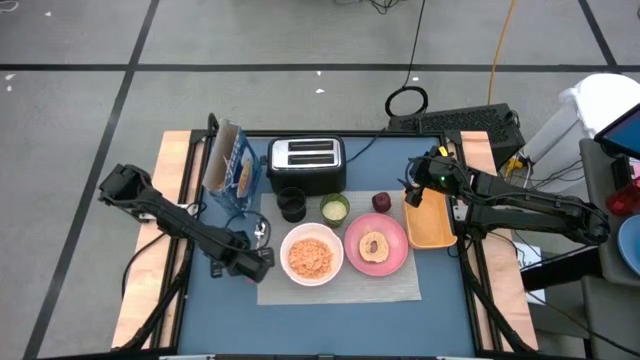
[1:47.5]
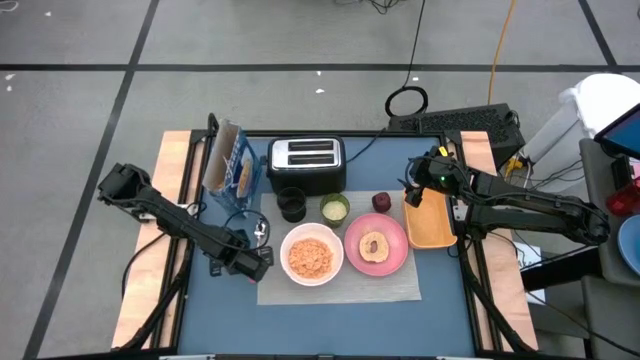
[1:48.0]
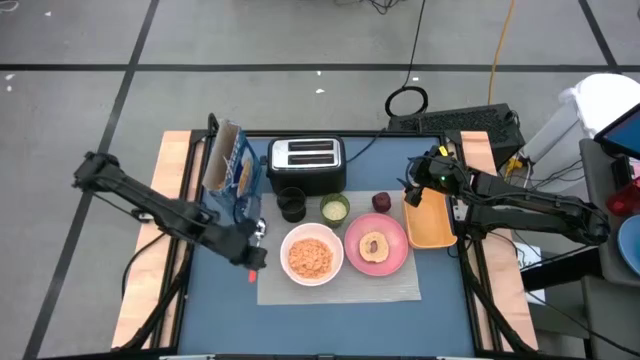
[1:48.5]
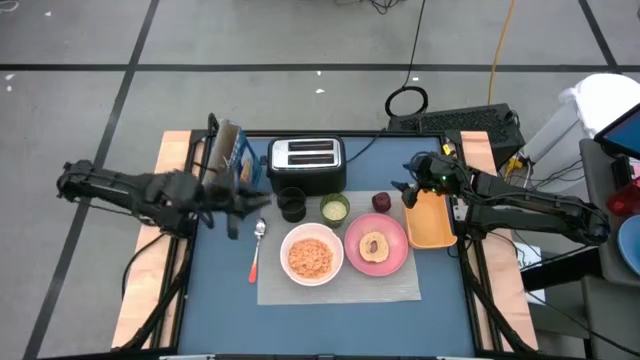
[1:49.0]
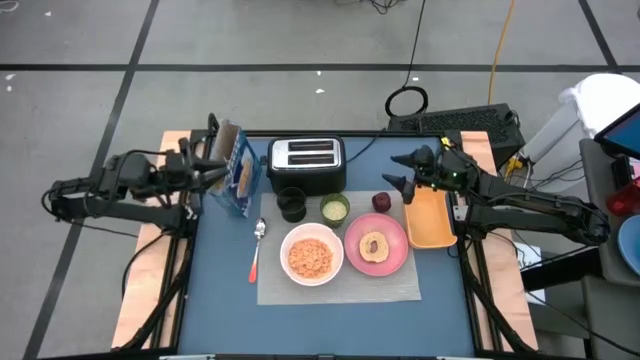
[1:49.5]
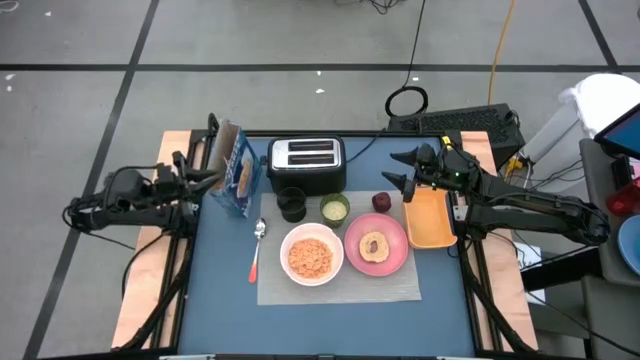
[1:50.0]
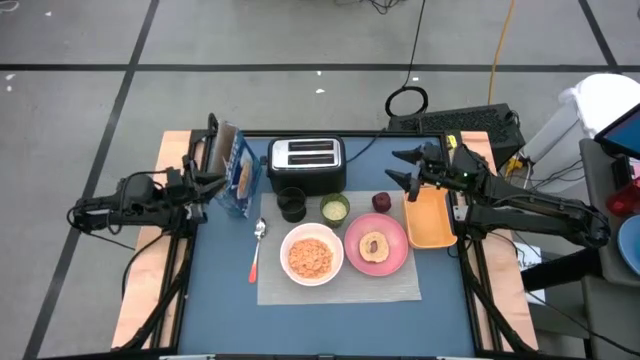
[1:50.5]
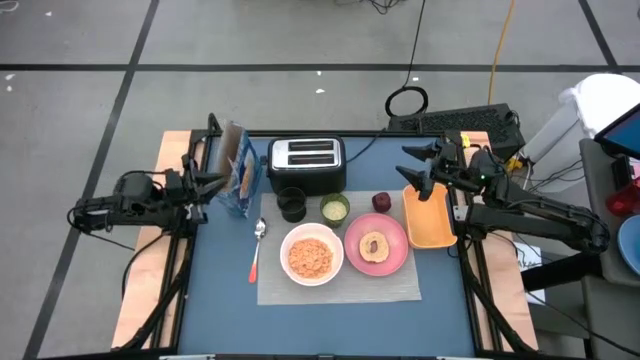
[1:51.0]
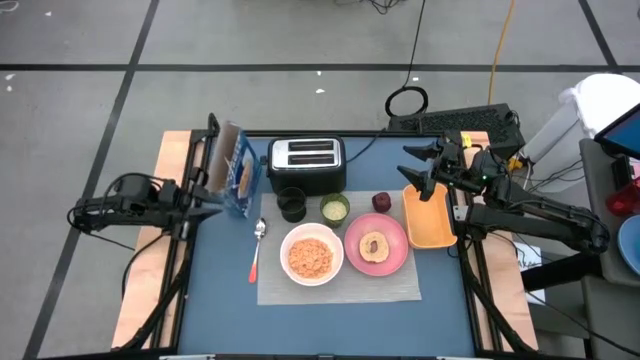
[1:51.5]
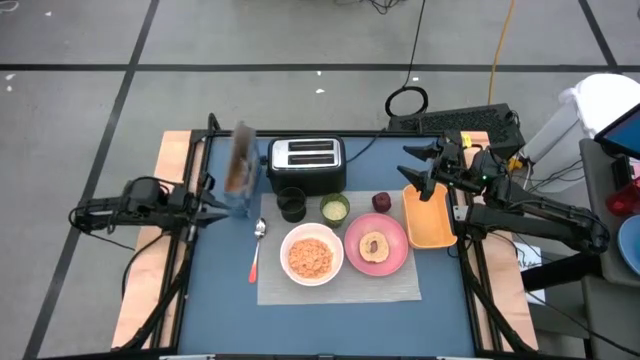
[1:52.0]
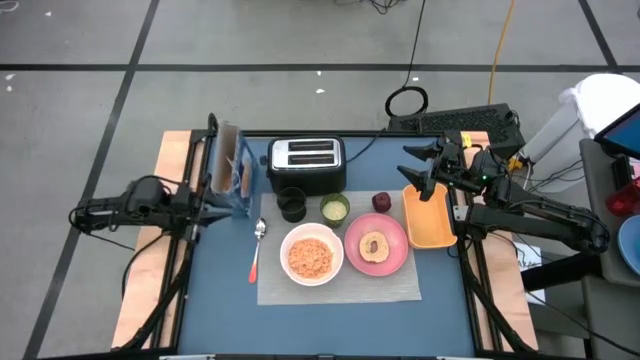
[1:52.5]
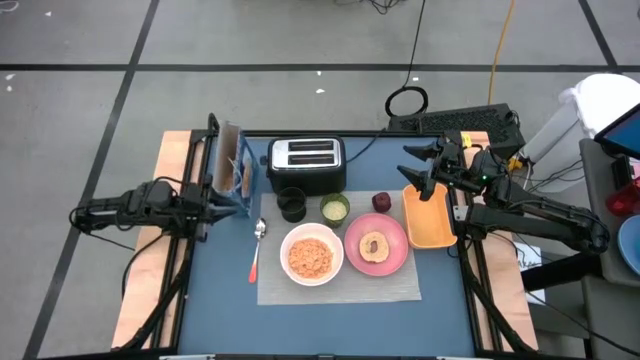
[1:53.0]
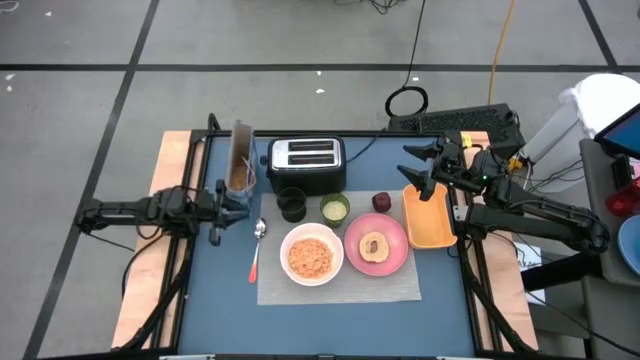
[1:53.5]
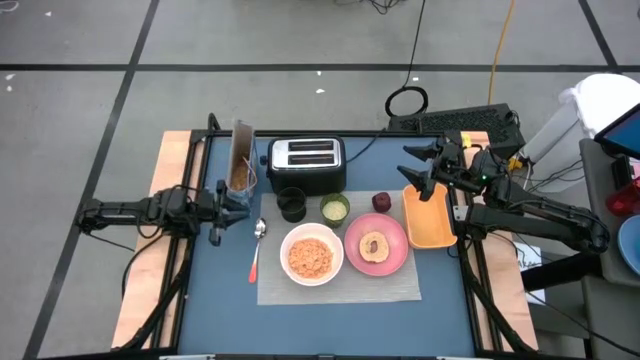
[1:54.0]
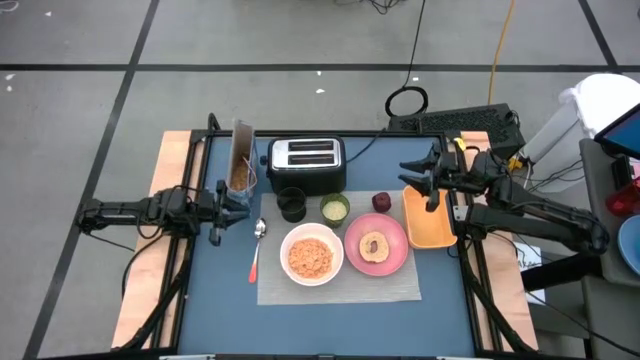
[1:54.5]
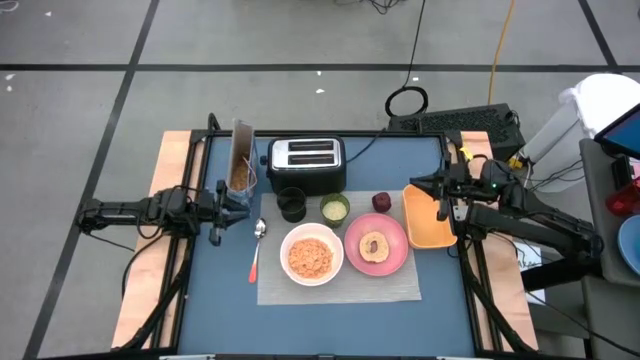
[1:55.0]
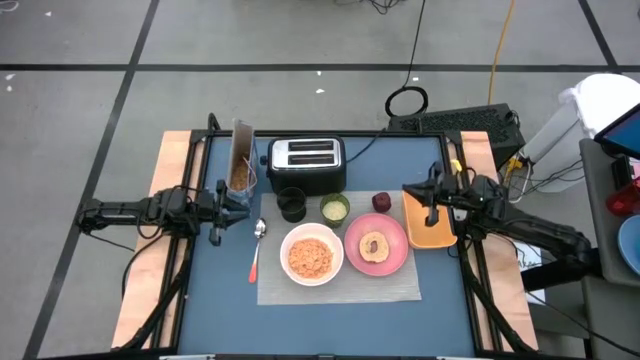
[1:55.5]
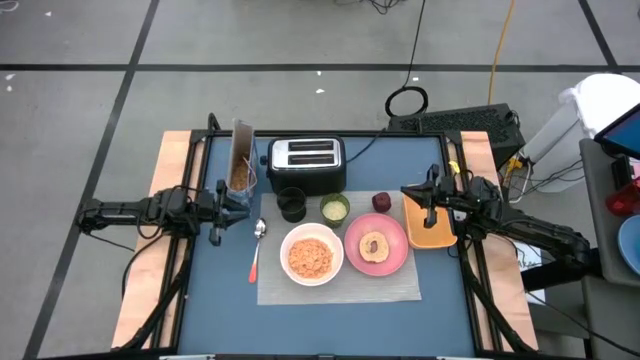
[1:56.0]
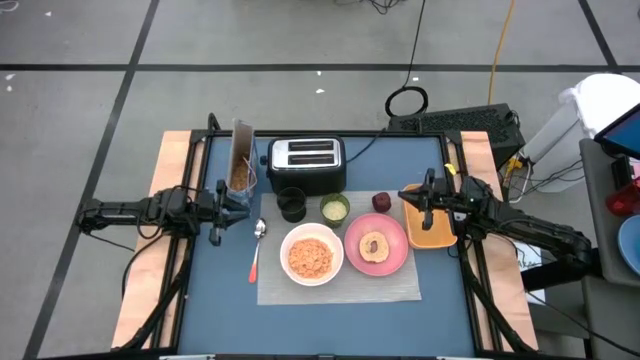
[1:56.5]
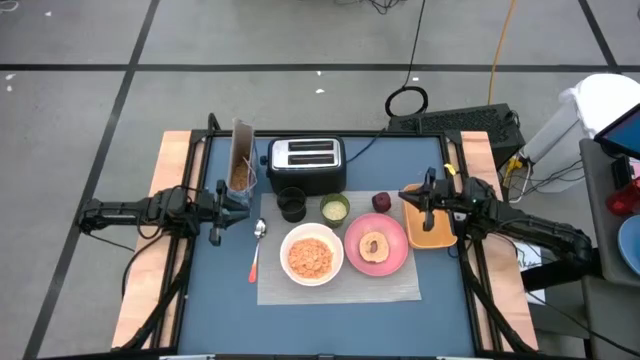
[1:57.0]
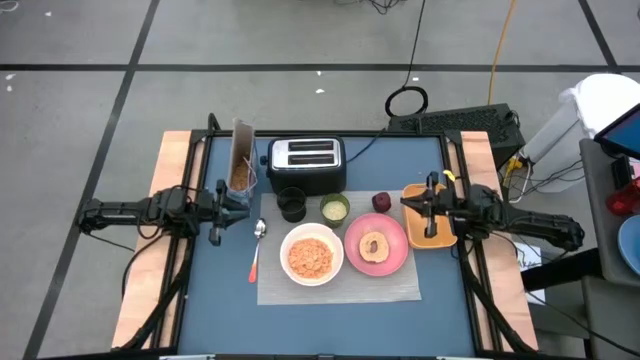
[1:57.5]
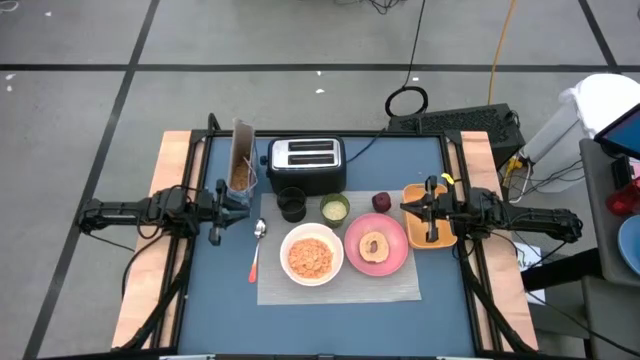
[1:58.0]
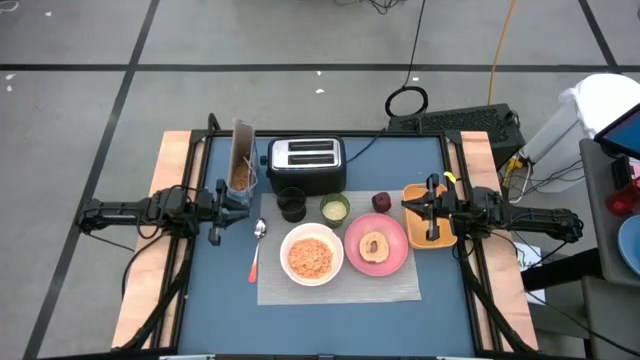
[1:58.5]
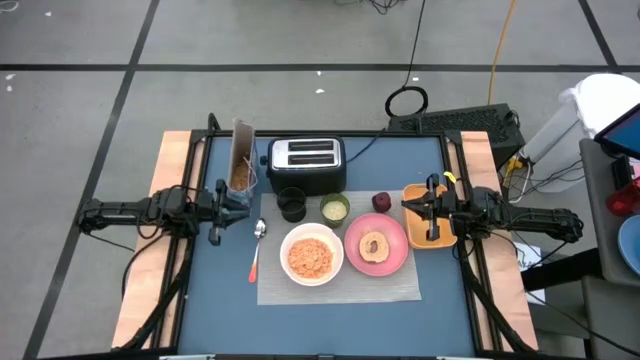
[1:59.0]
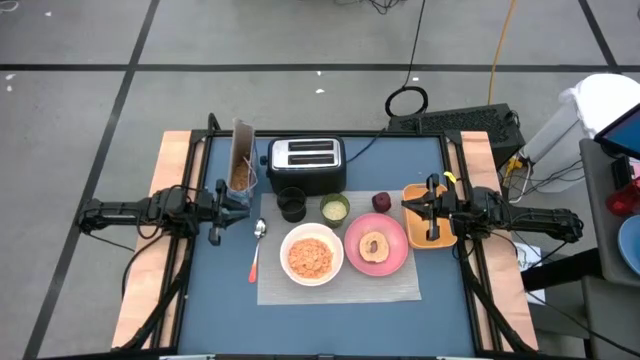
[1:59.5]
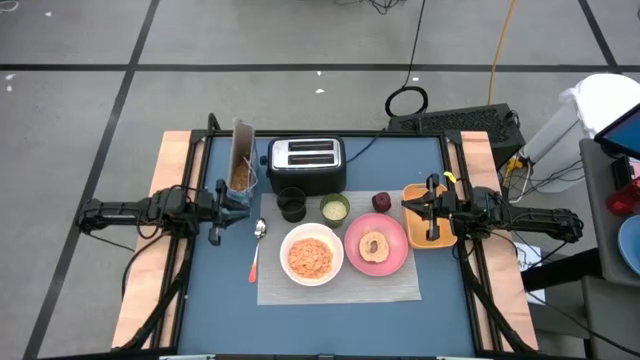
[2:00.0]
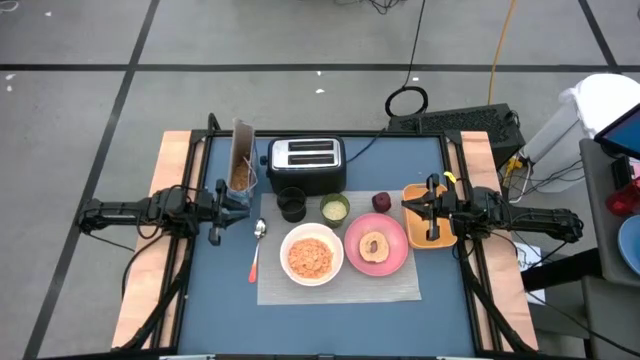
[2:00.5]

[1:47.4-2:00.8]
Task: Arrange a breakfast setting
Return to Home Position

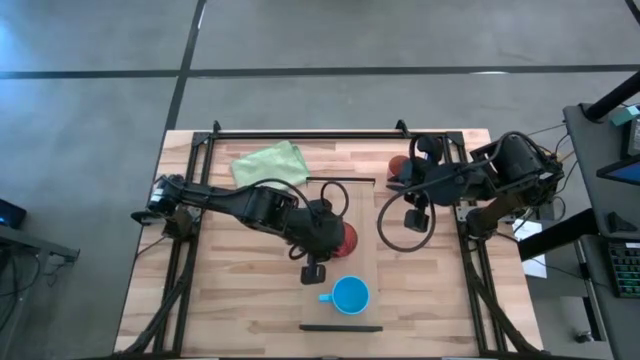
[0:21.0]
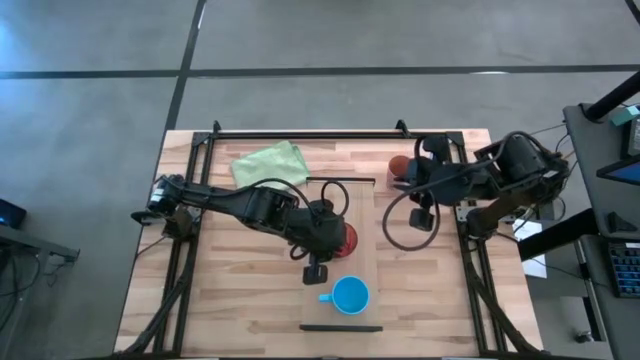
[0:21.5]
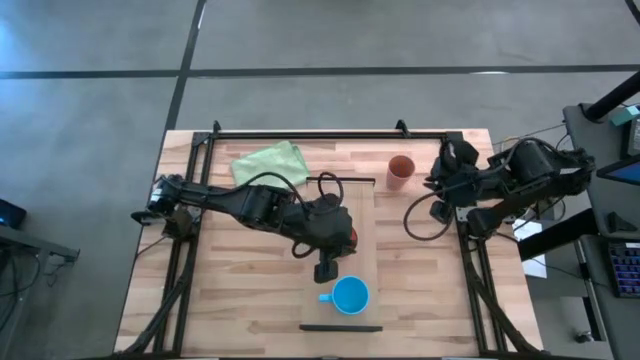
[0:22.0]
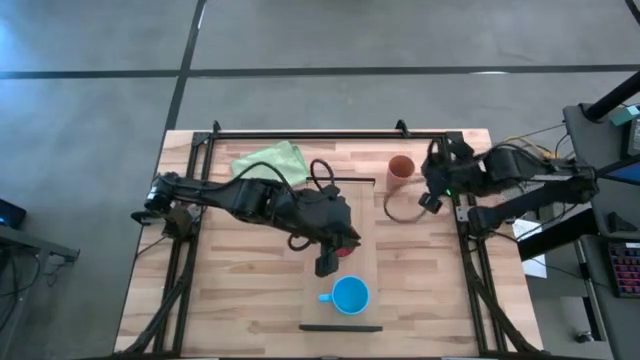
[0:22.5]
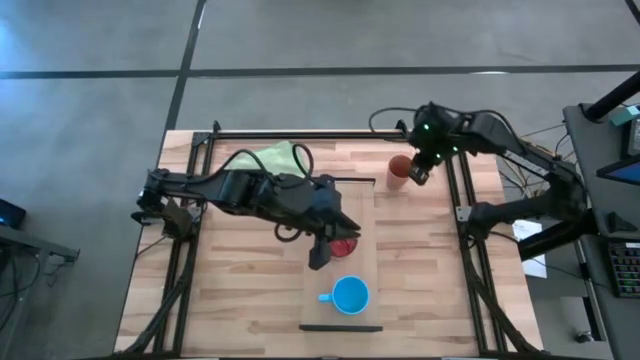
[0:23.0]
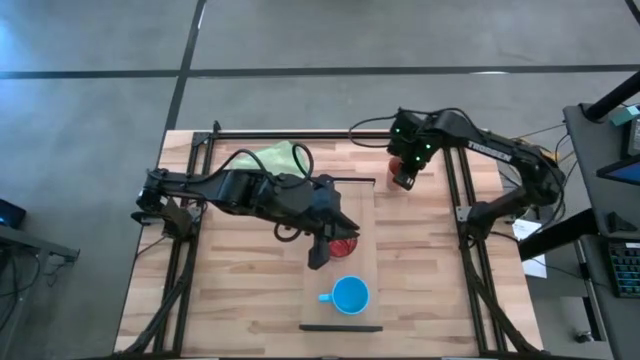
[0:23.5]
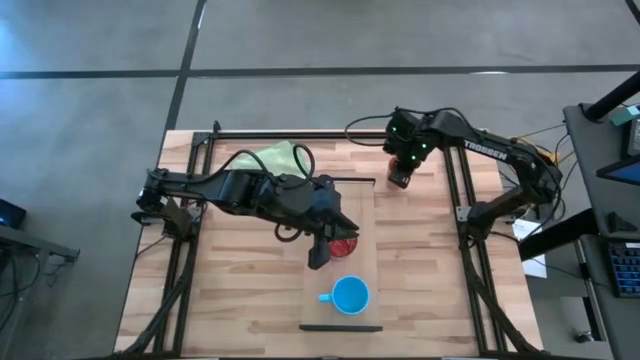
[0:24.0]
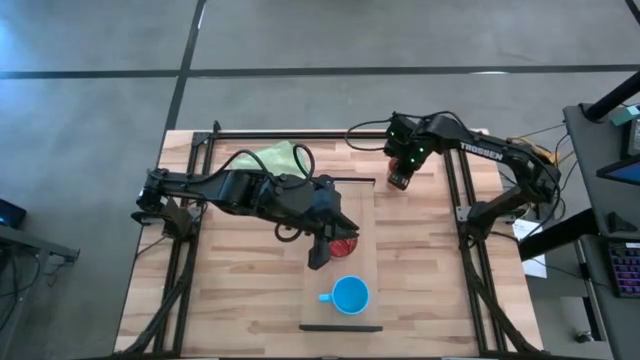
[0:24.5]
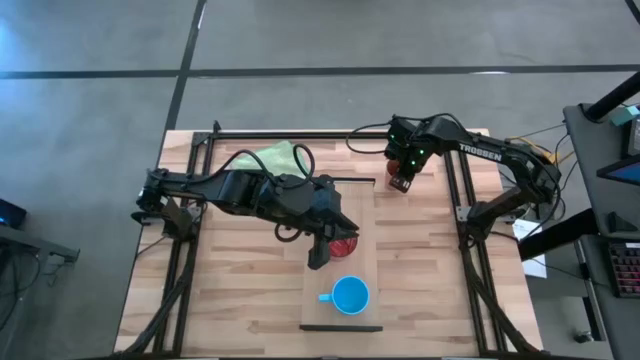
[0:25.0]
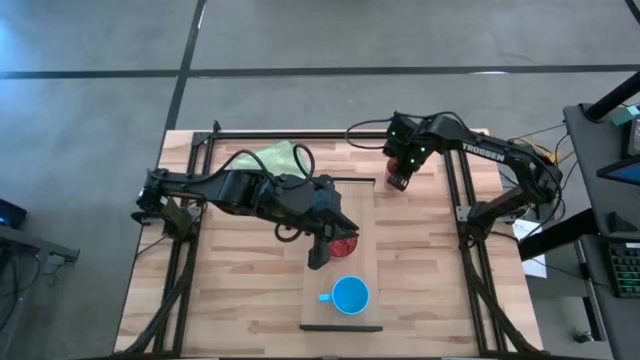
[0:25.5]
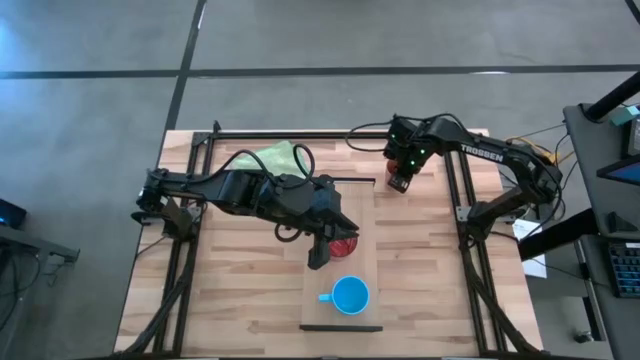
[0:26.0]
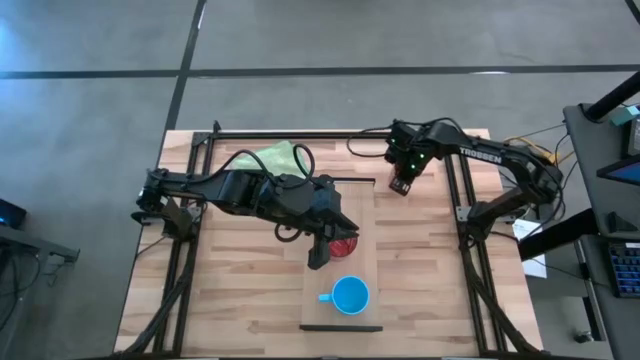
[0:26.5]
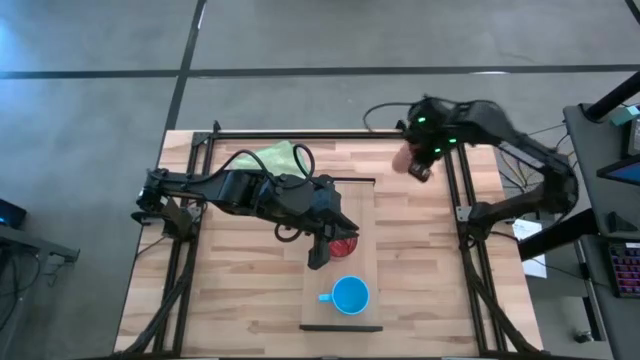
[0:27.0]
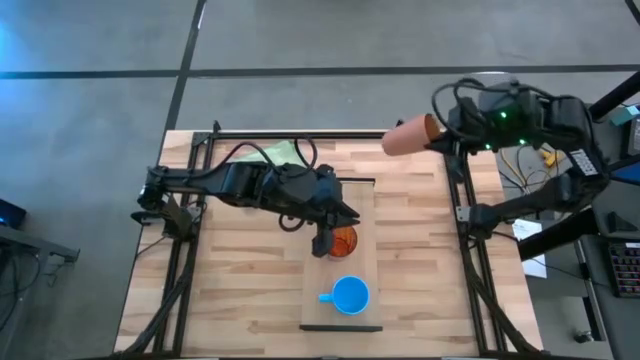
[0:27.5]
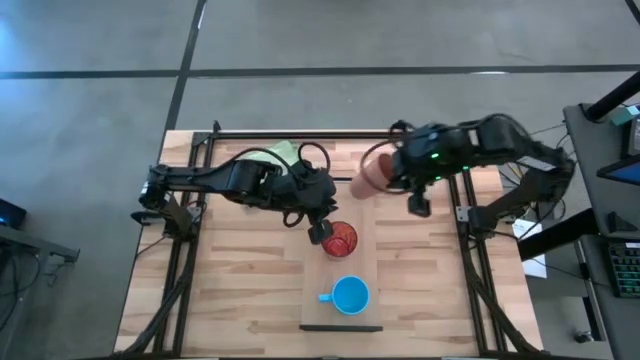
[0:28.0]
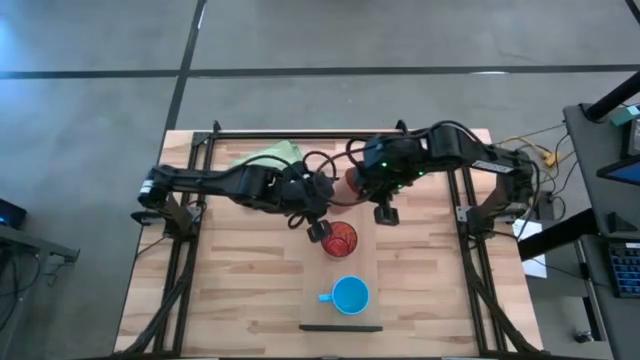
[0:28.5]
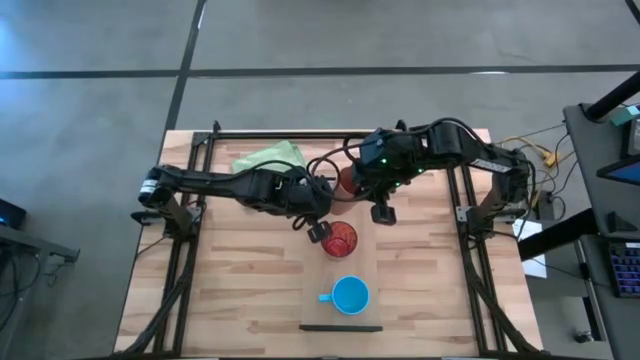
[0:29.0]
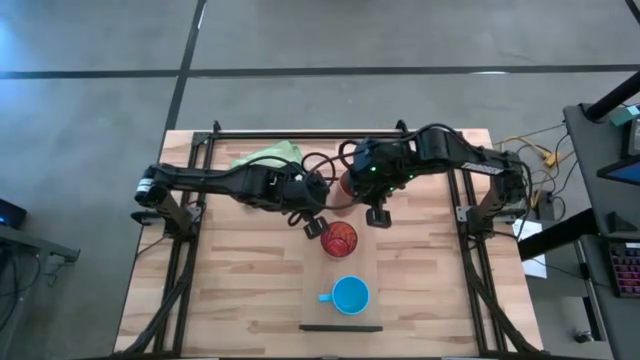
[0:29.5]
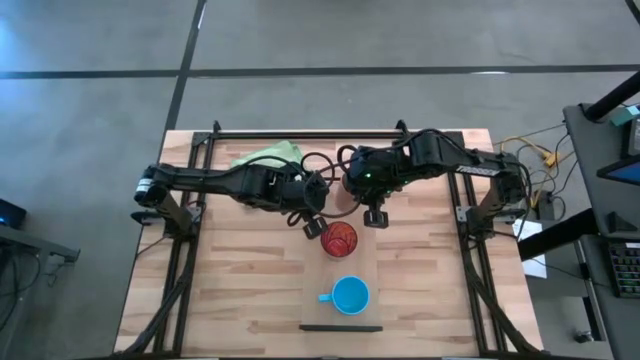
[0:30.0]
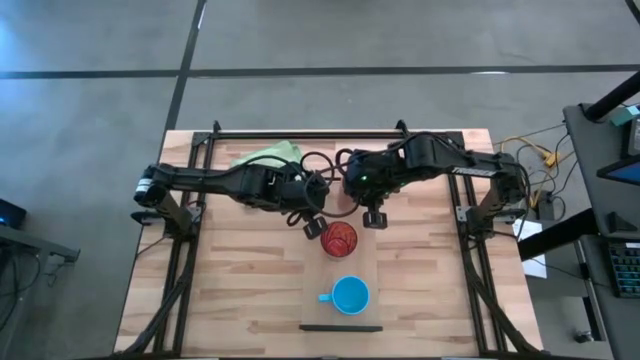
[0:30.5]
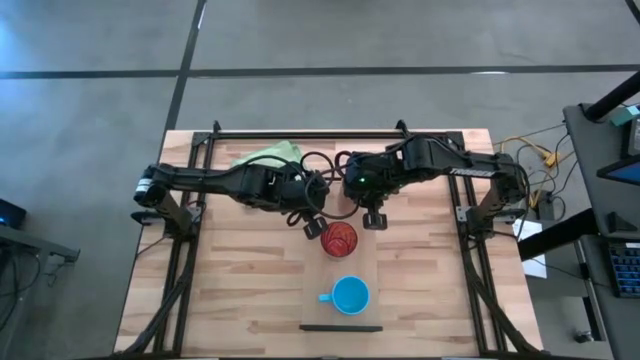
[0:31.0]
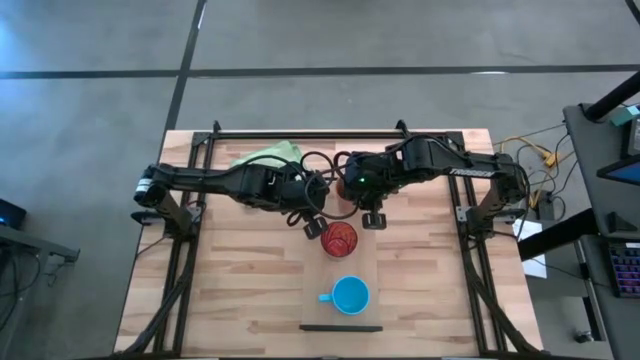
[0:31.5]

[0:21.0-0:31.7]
Task: Stack small to large cups/mugs on shelf
Put the brown cup on the shelf
